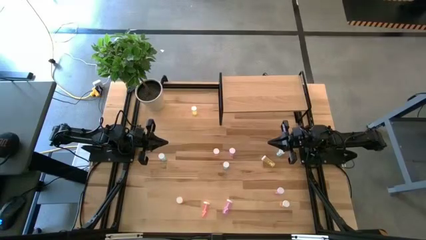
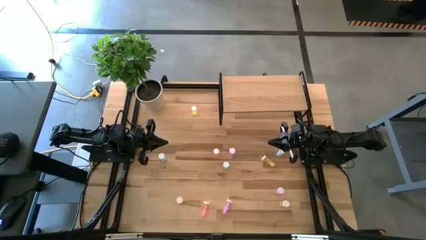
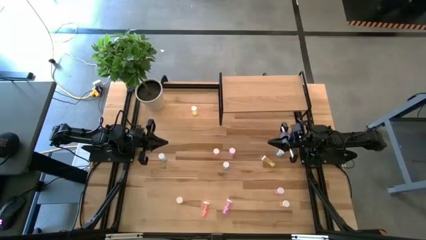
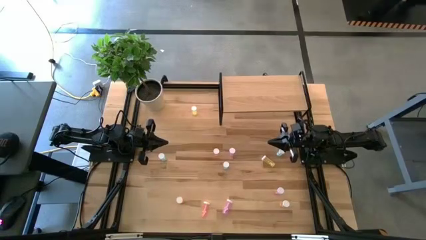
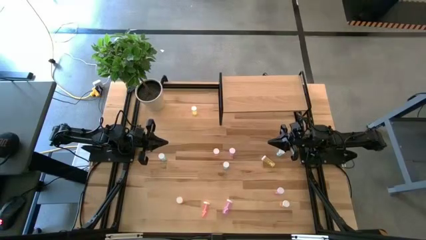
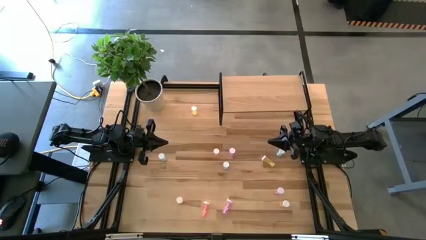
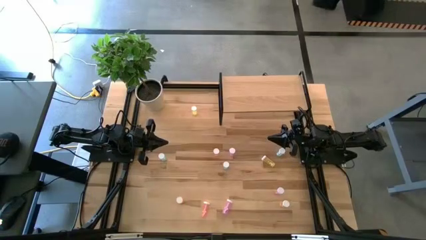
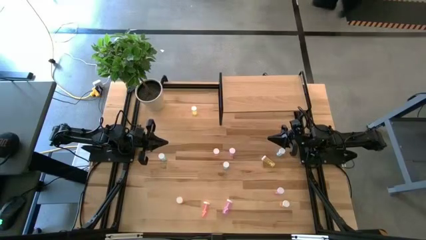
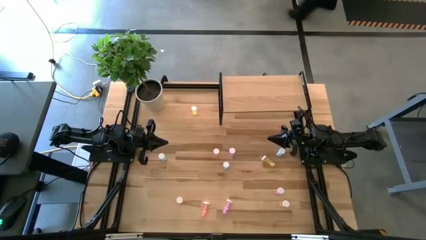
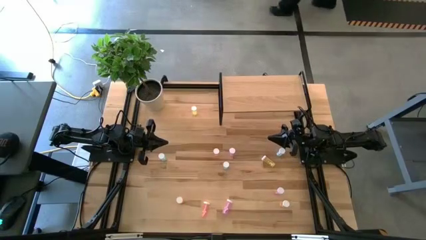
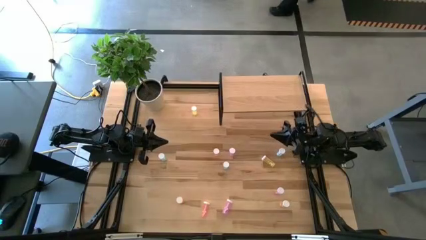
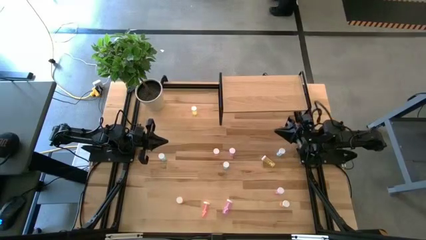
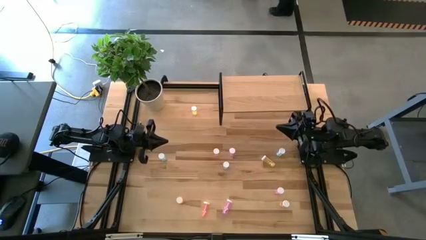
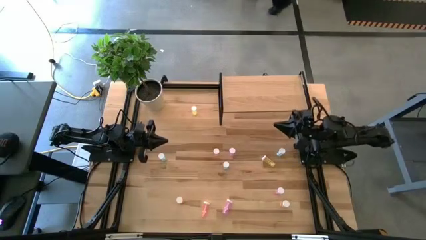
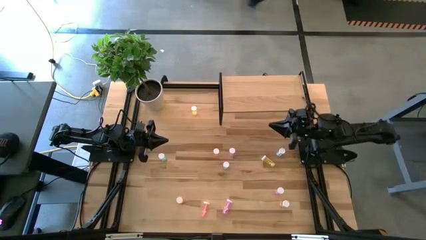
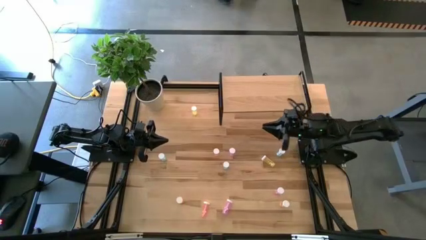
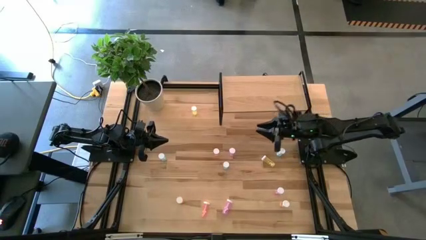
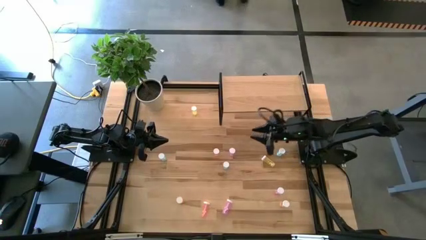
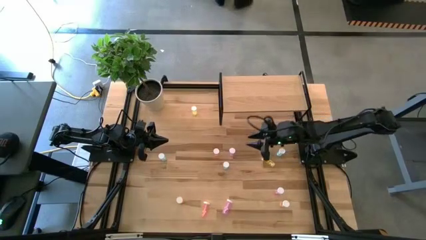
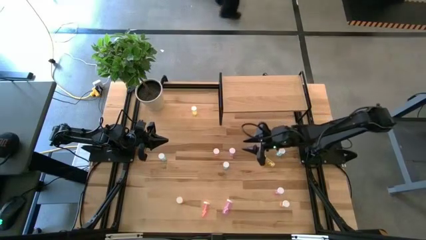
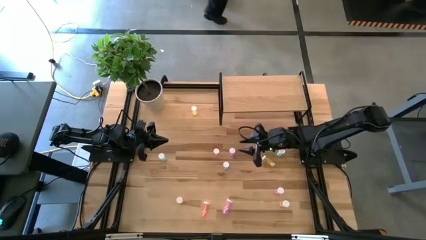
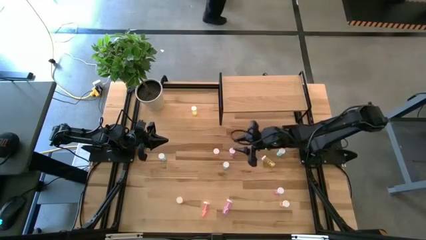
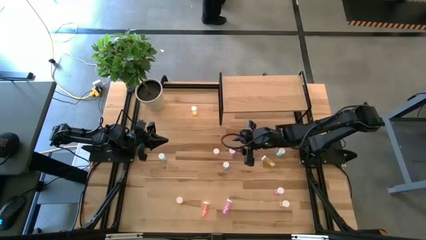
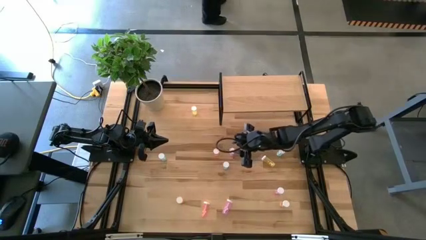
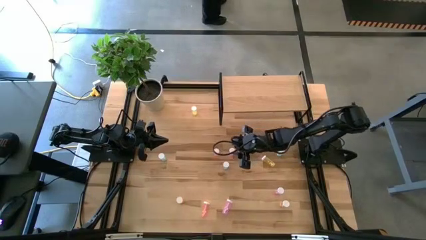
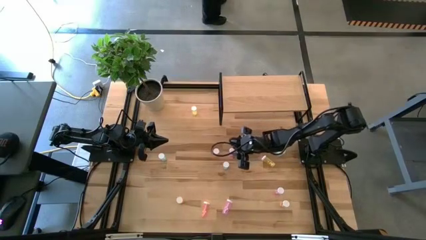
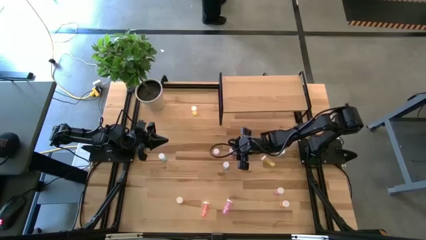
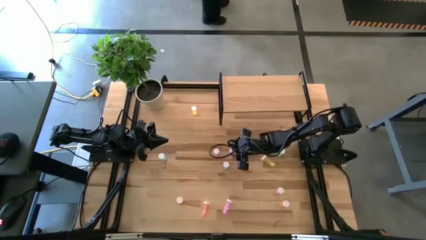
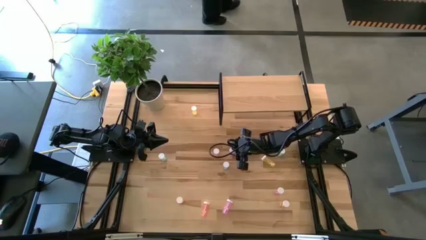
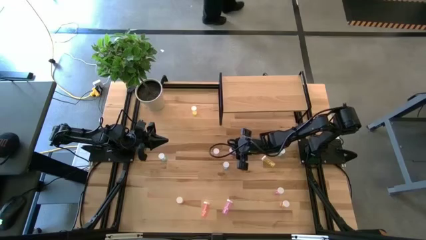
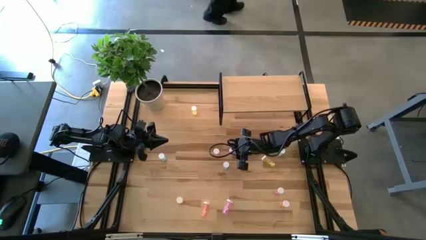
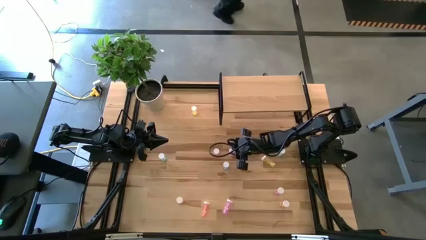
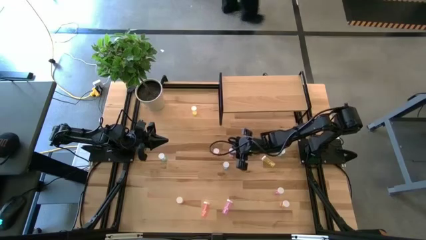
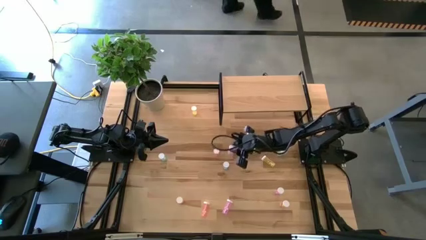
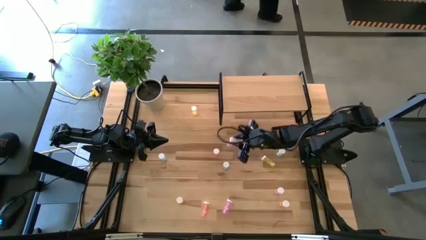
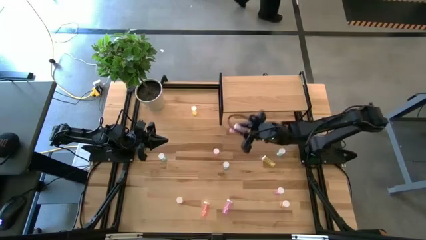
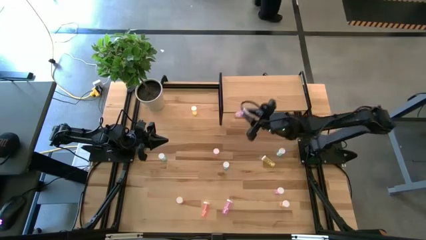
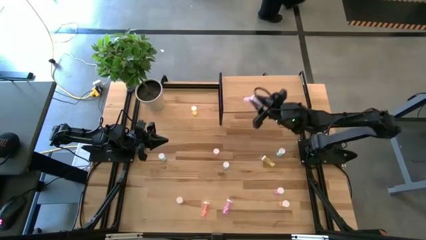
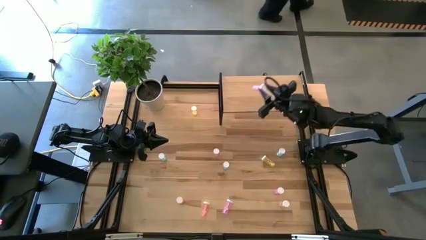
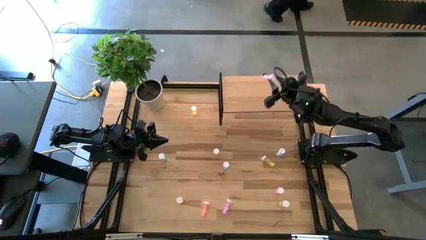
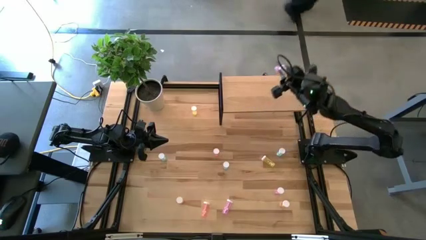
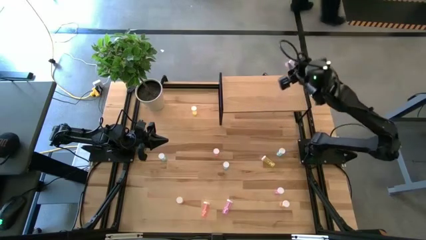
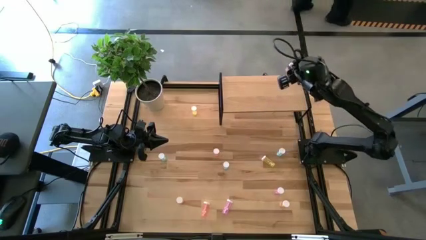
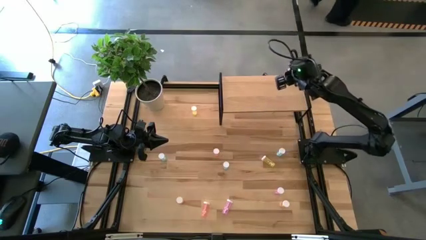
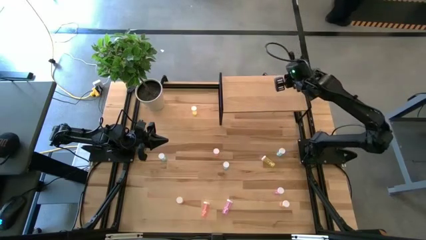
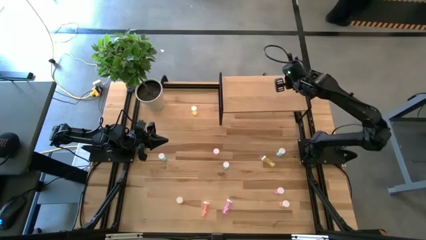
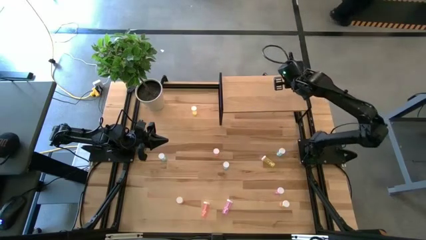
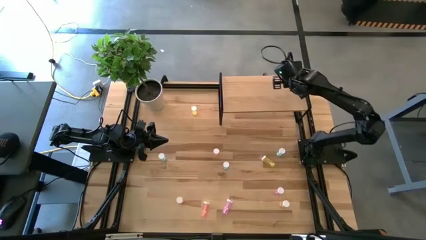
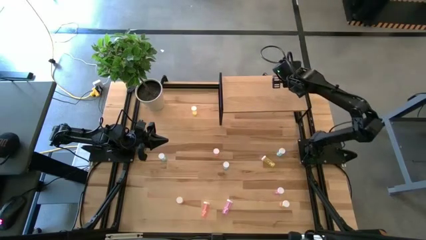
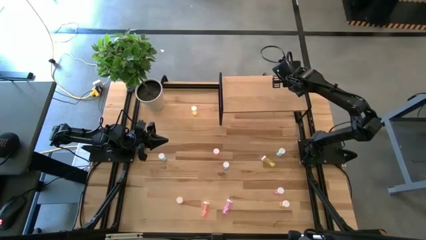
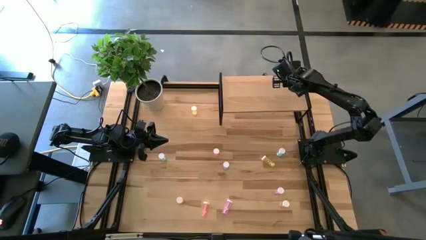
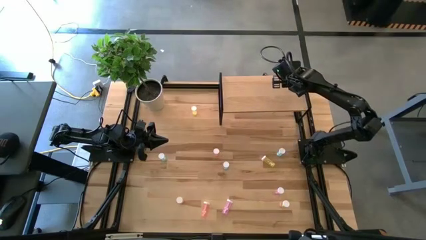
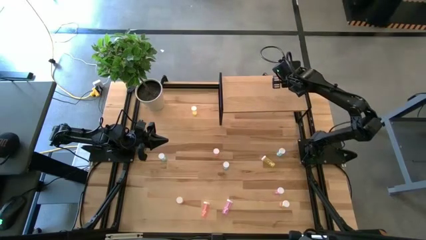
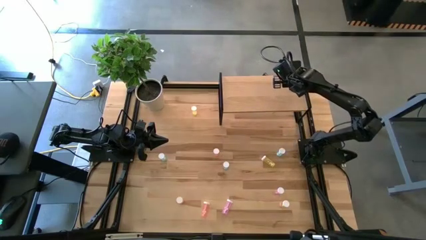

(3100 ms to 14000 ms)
Task: Pick and place medicine bottles onto shelf by color
Put the top purple pill bottle on the shelf

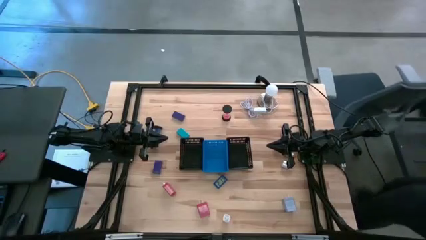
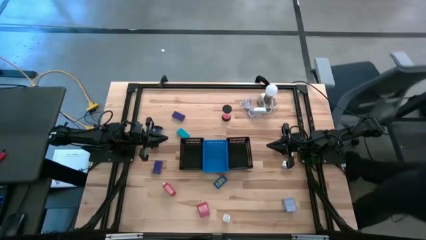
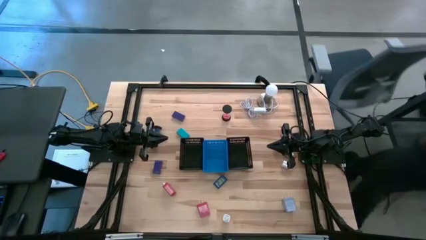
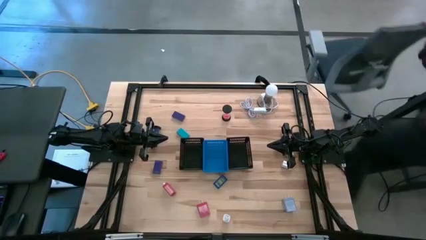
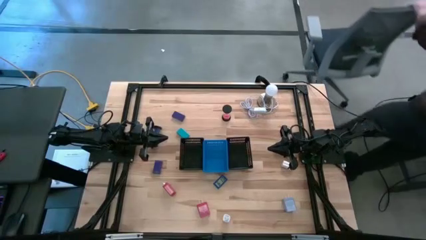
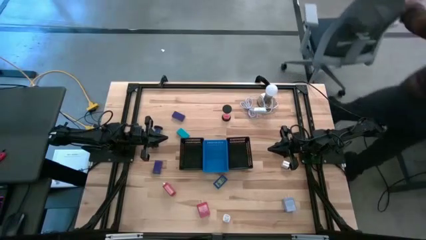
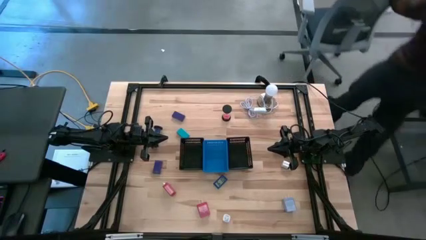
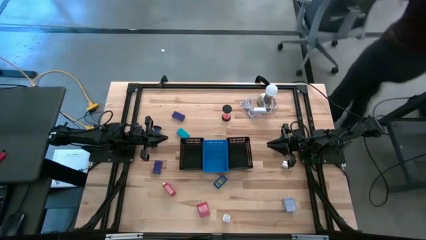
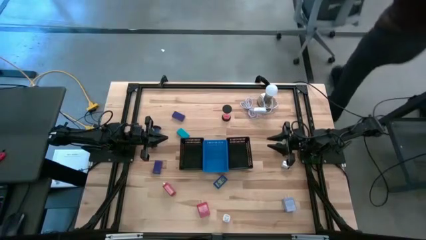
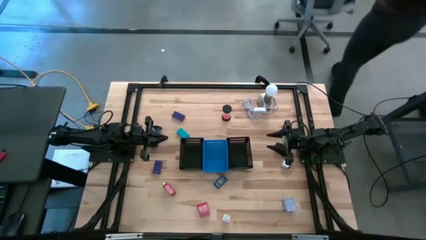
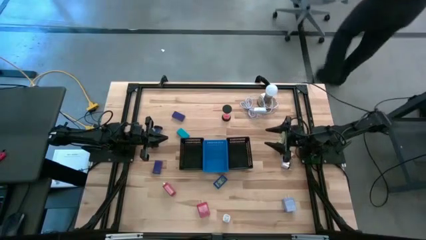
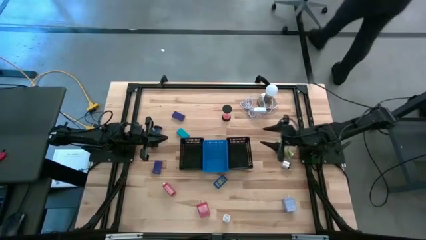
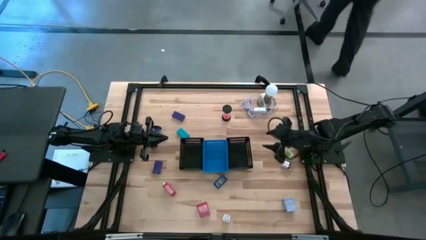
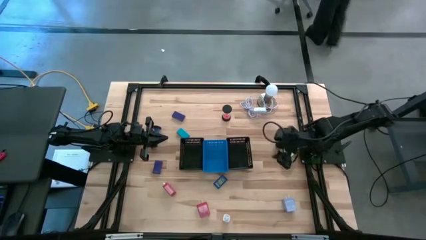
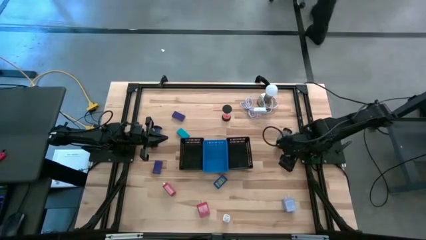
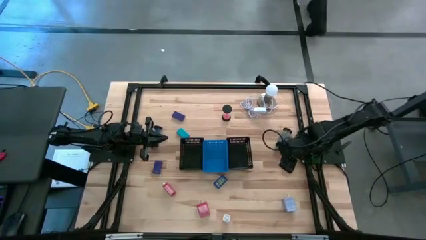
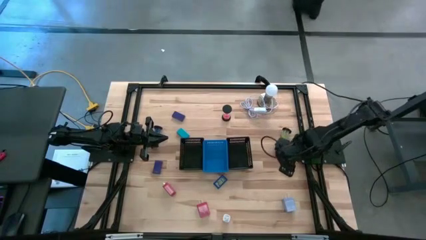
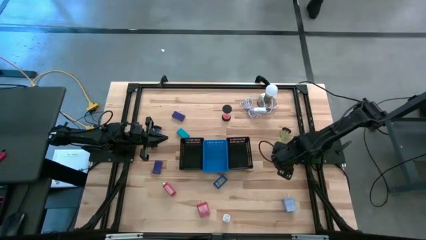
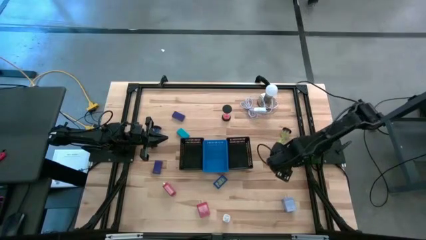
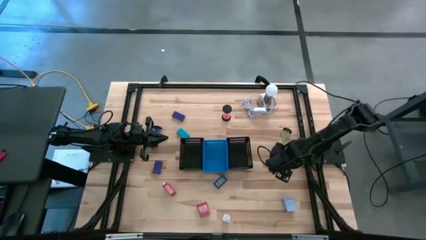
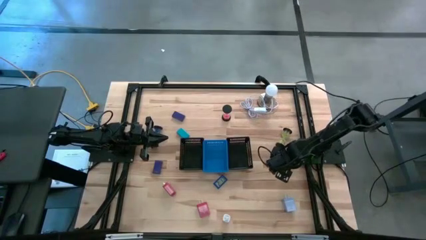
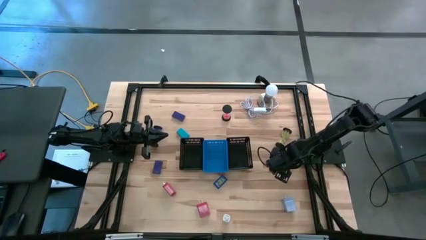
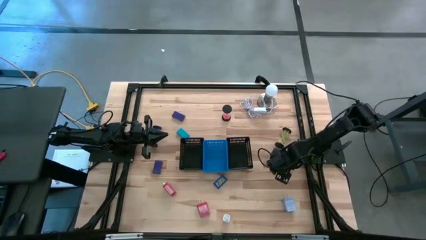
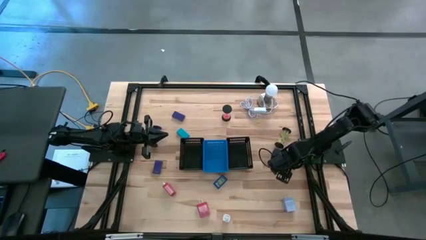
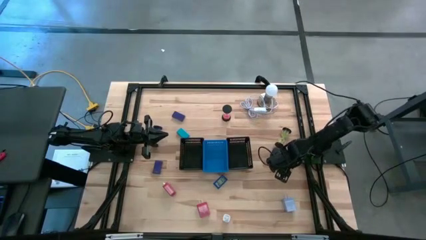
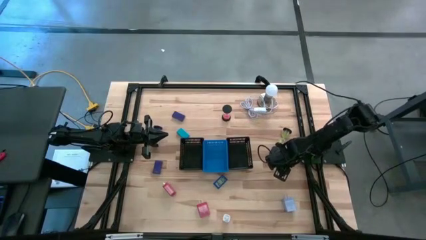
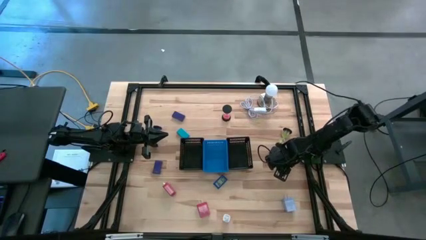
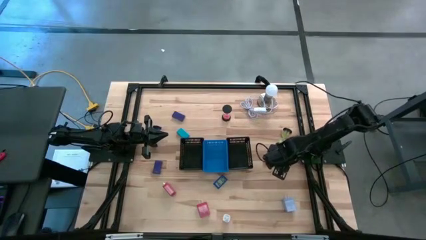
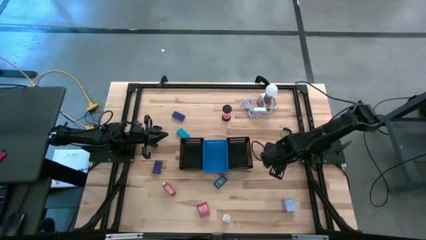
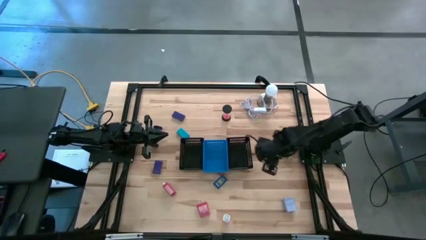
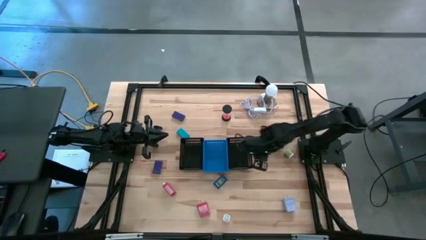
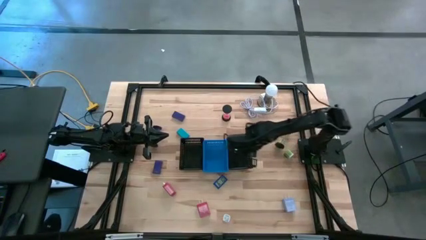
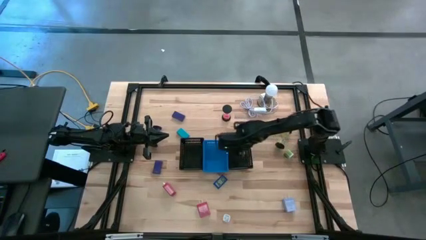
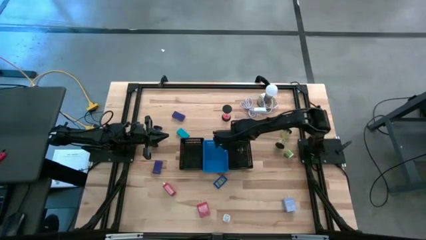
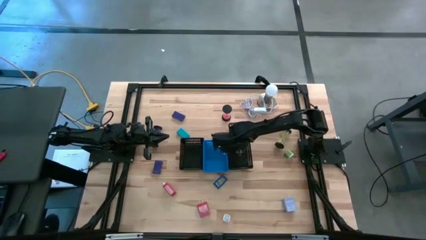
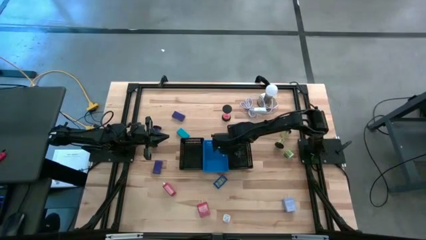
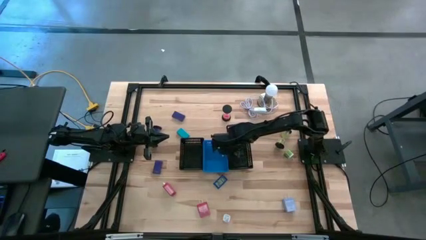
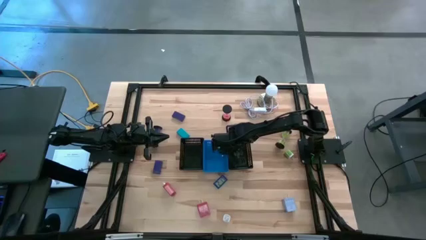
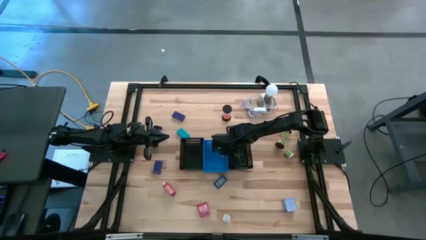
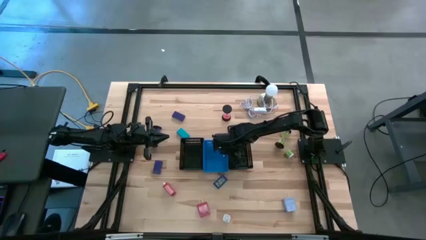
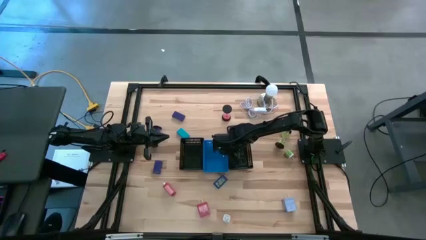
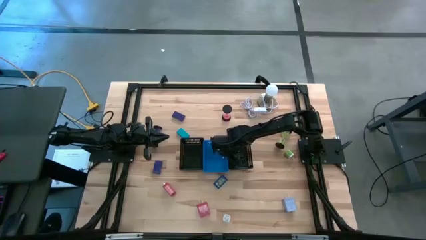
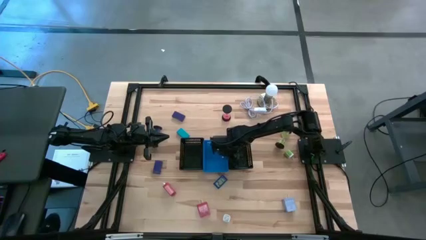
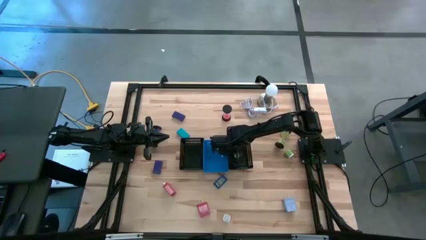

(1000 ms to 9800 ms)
Task: Pick & Place Office items
Put the white charger adapter into the right black bin
